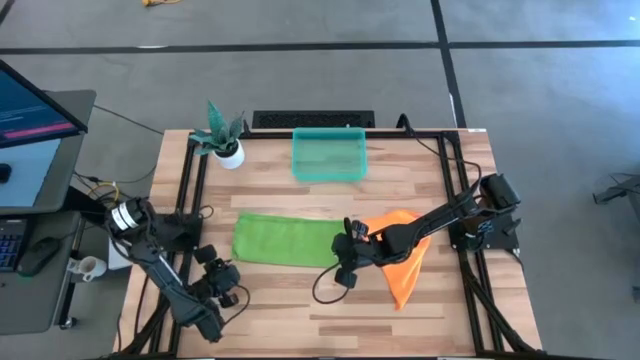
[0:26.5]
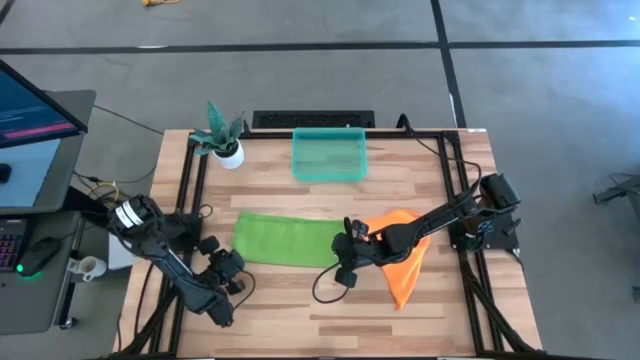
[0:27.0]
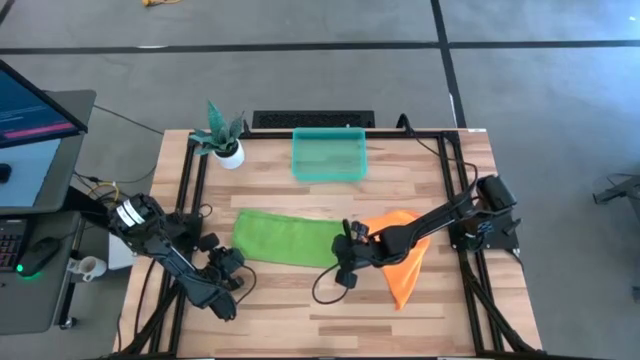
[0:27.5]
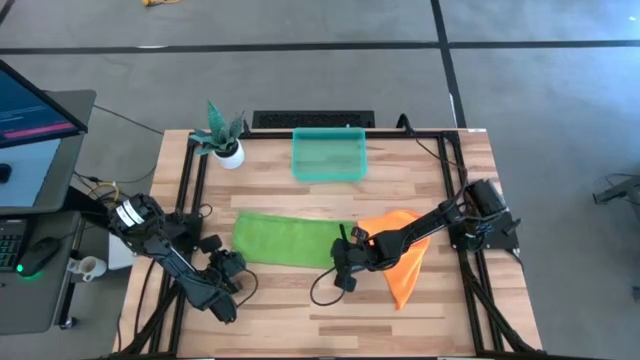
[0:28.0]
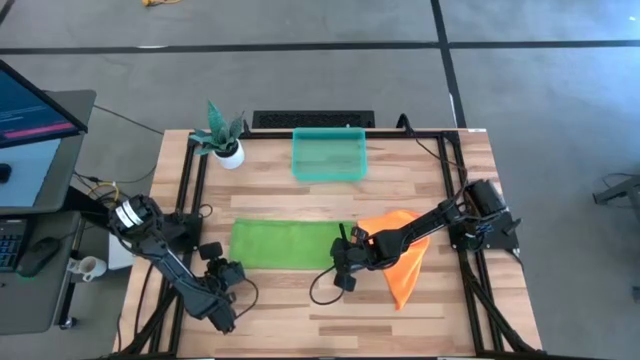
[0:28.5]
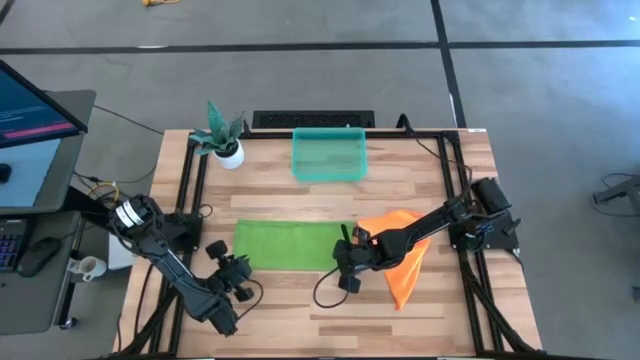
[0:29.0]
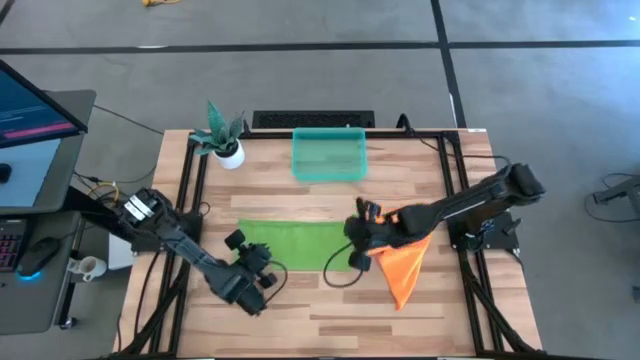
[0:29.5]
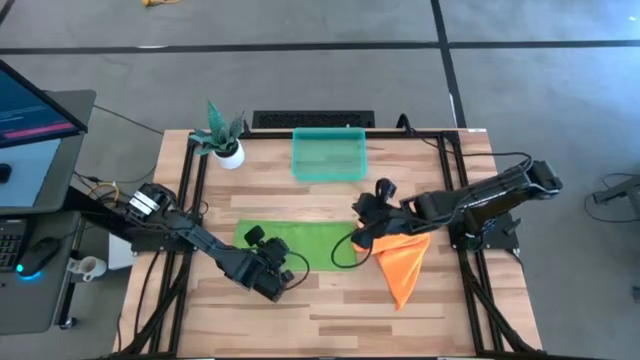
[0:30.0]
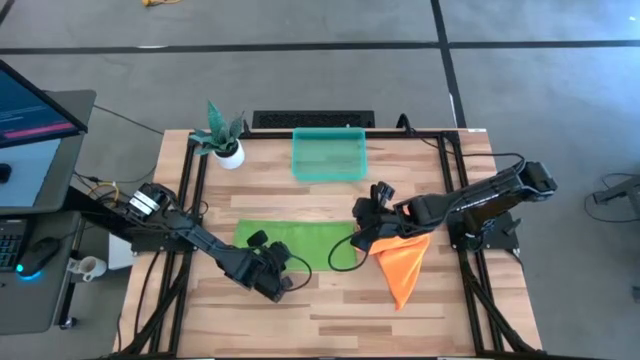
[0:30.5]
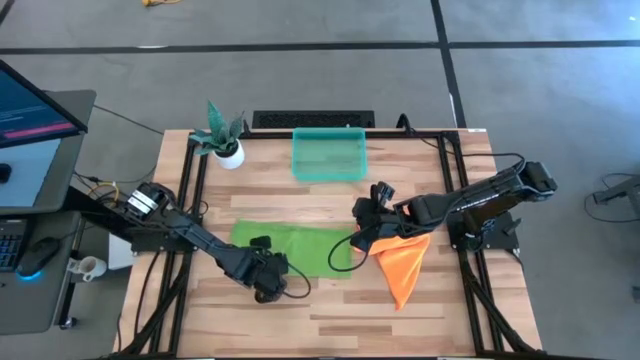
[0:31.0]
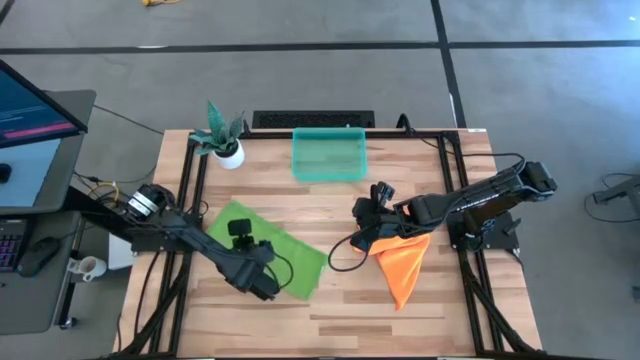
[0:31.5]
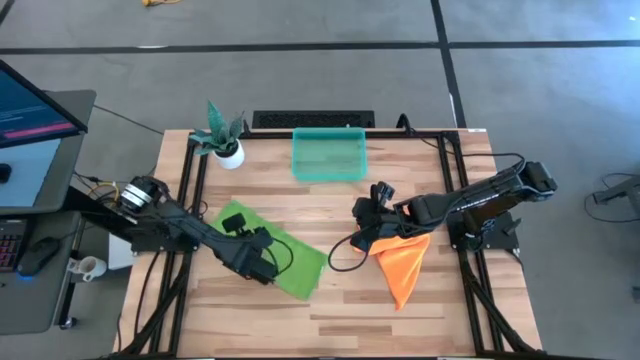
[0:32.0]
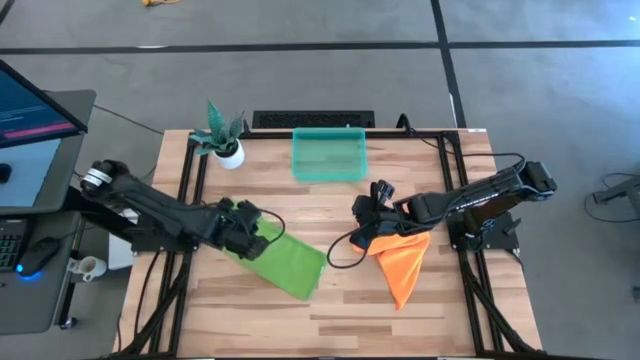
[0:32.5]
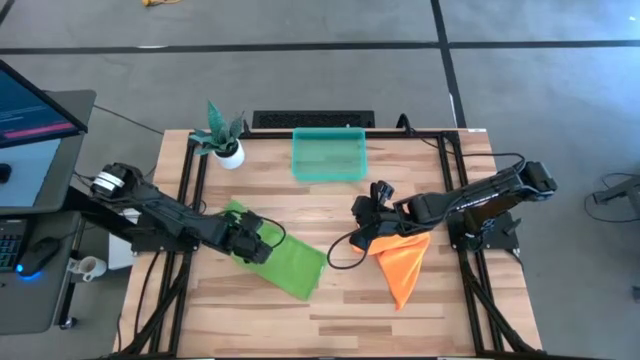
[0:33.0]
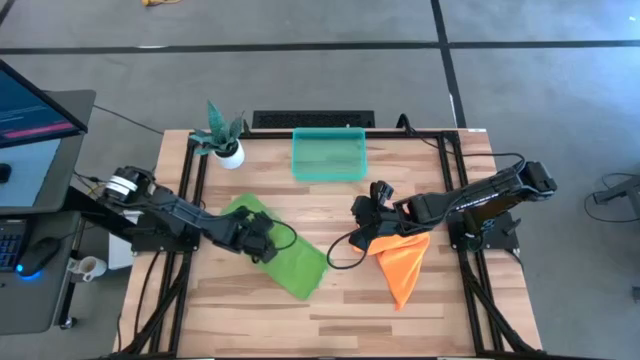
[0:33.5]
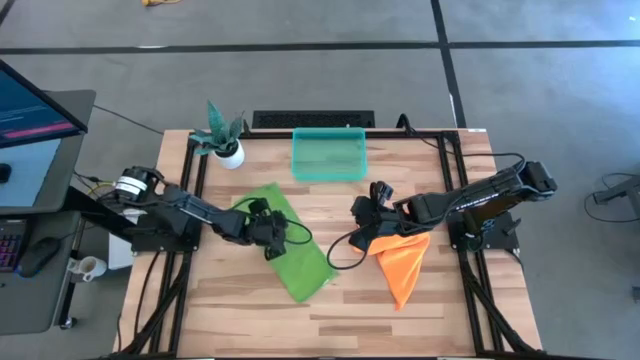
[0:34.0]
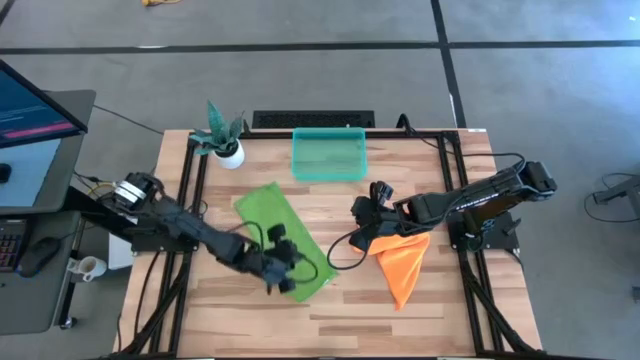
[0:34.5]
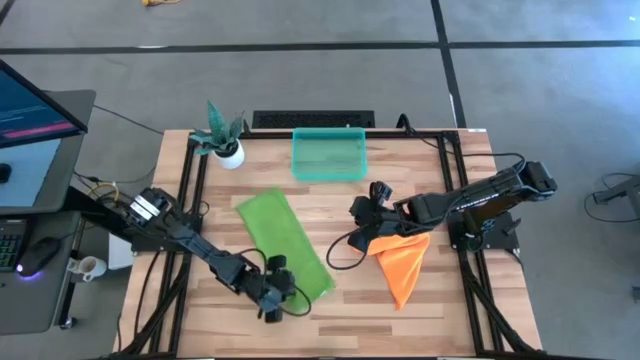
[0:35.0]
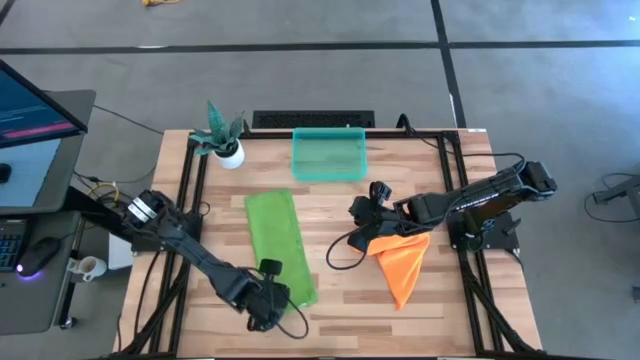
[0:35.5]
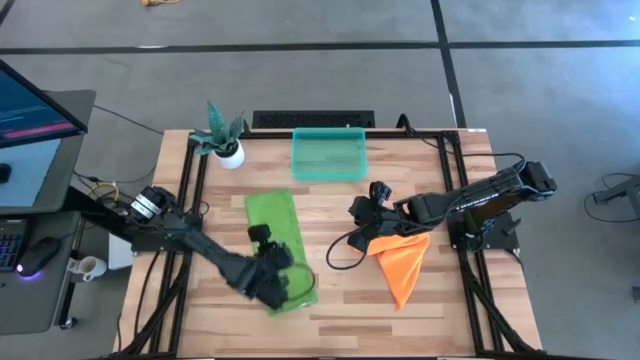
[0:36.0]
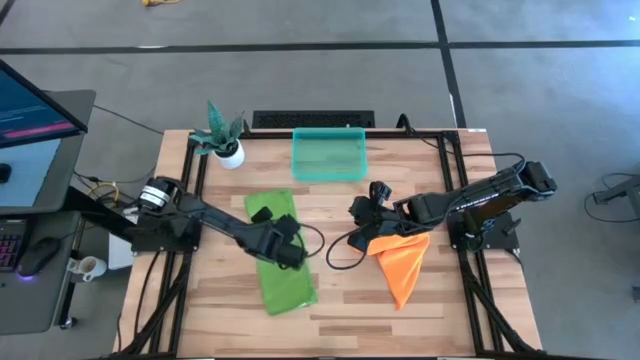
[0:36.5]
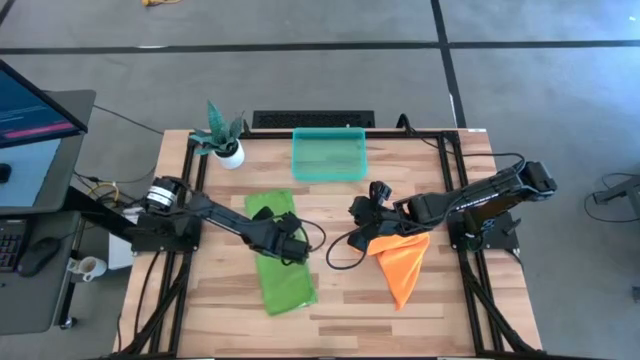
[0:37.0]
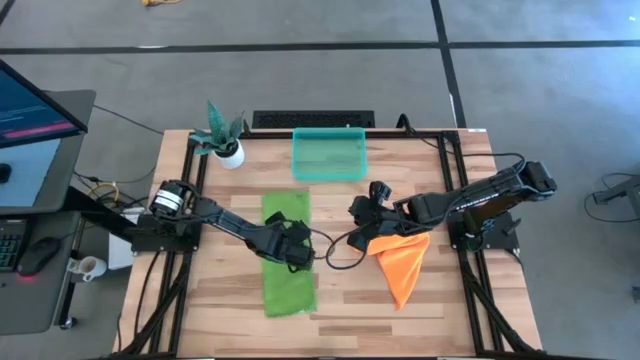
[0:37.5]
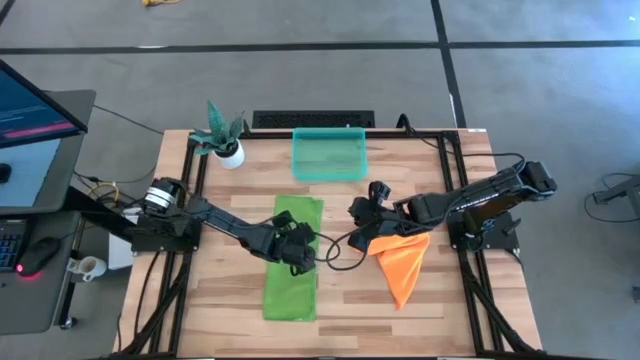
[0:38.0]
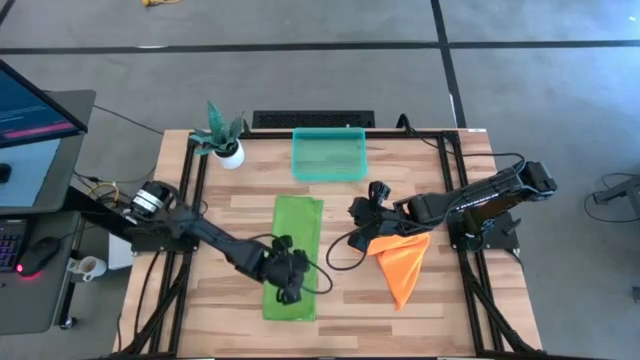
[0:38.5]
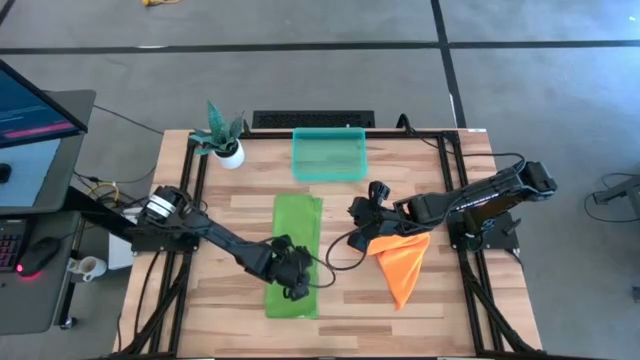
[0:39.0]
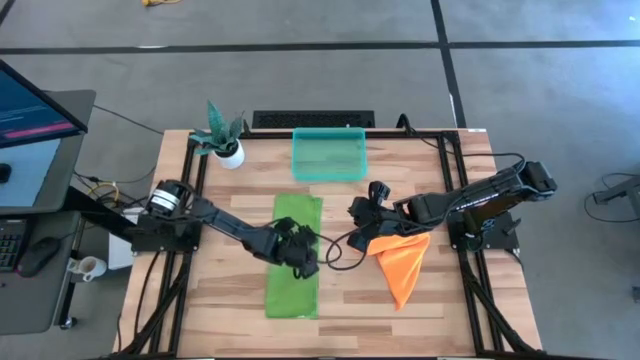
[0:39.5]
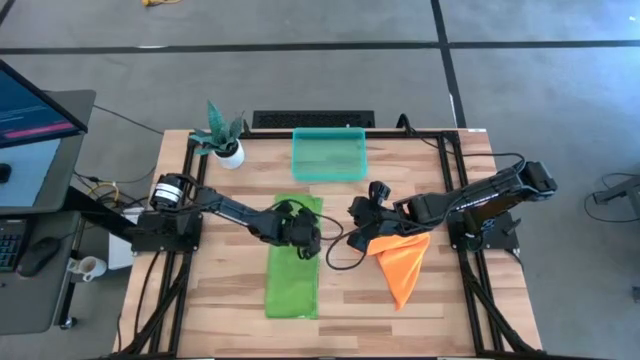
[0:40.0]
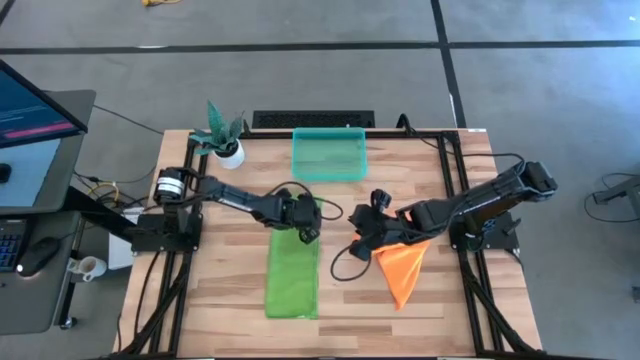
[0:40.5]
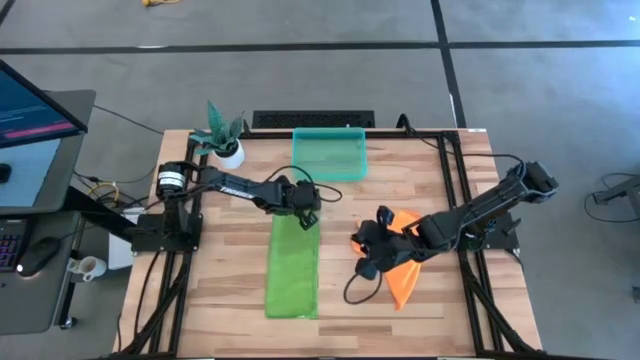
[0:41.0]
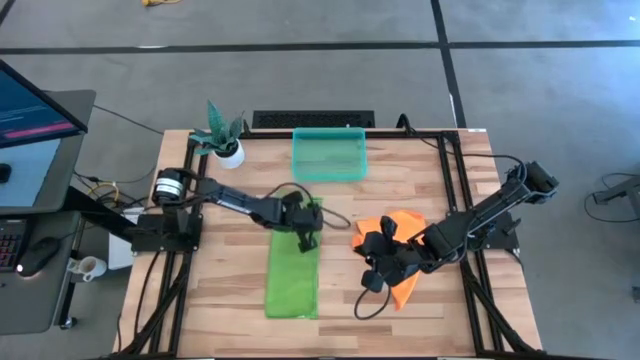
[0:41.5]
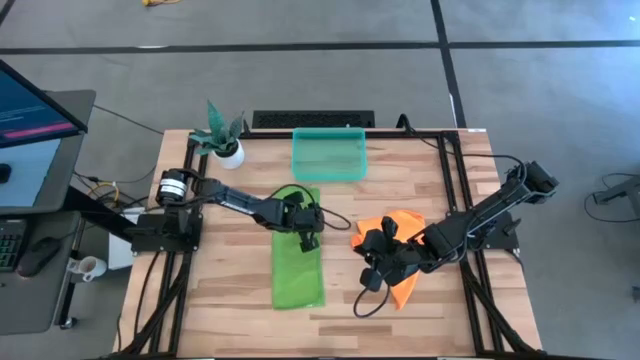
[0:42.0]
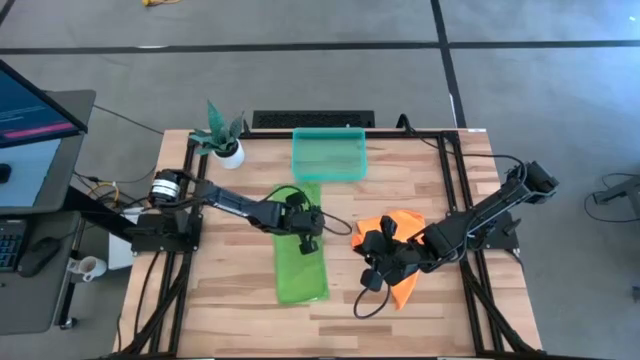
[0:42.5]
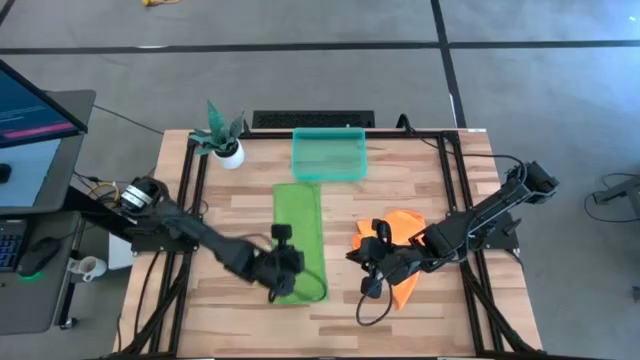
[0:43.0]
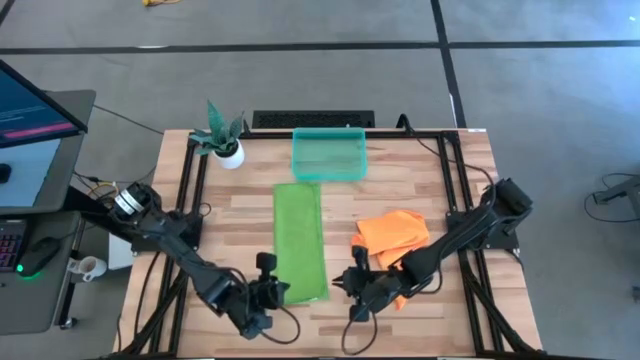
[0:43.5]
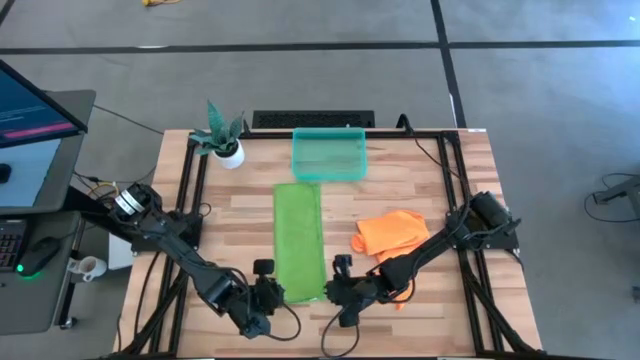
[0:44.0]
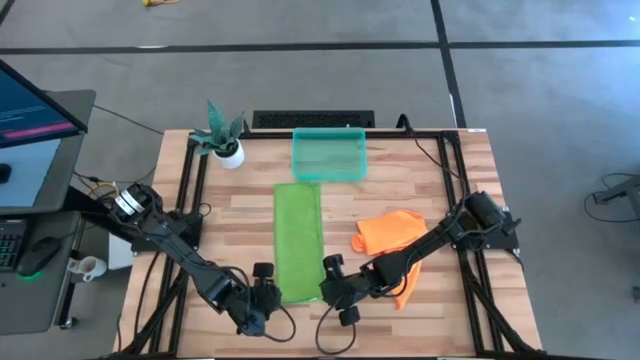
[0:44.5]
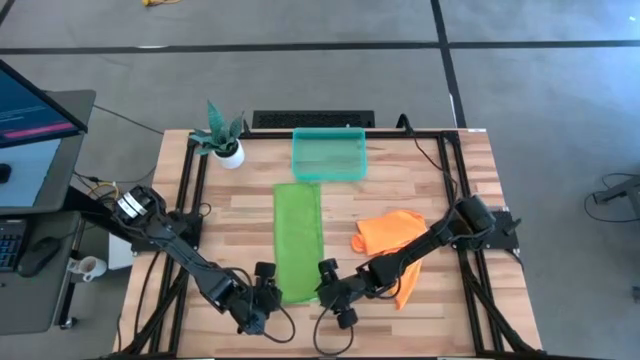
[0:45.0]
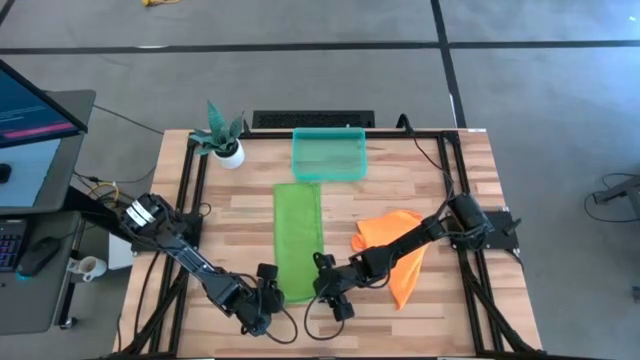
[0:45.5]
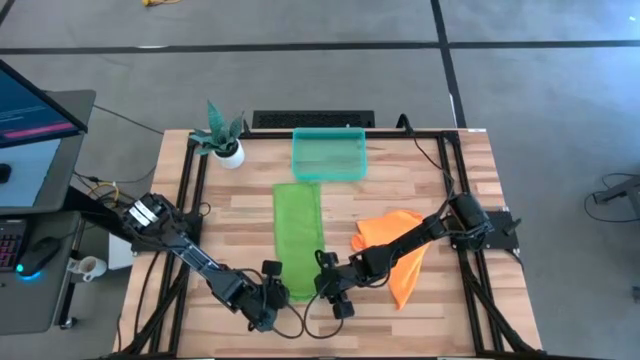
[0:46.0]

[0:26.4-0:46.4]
Task: Roll towel into tight, uniform cylinder
Roll the green microfiber towel

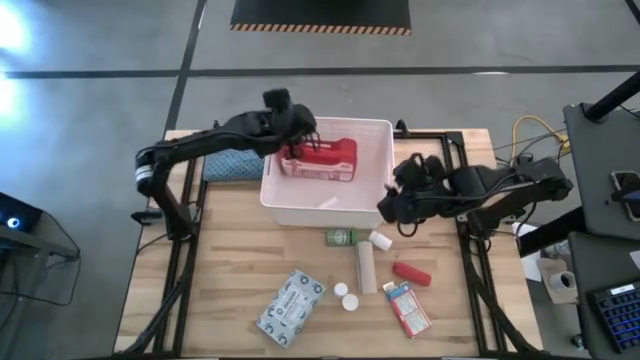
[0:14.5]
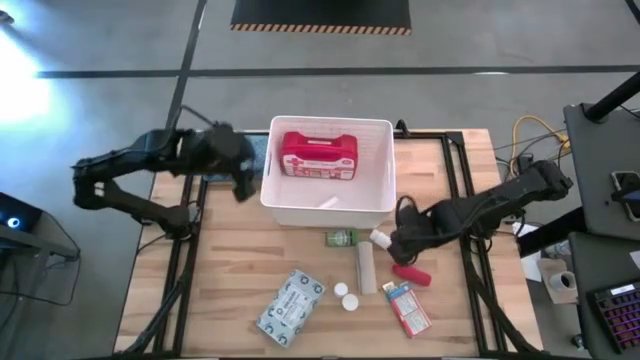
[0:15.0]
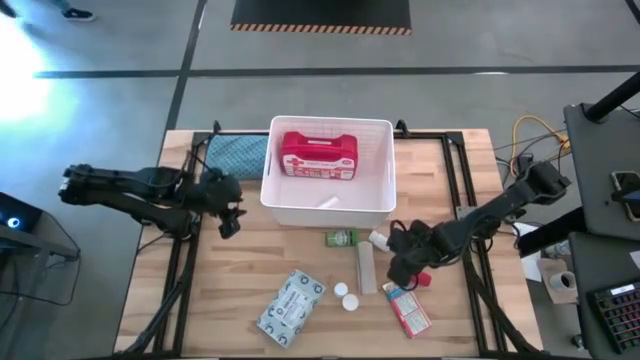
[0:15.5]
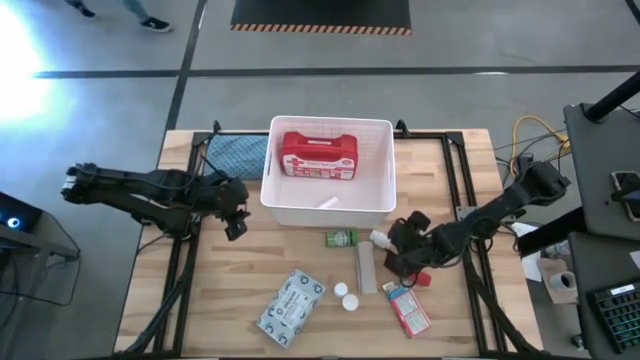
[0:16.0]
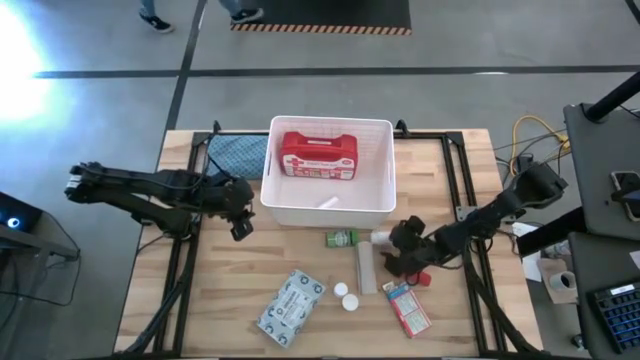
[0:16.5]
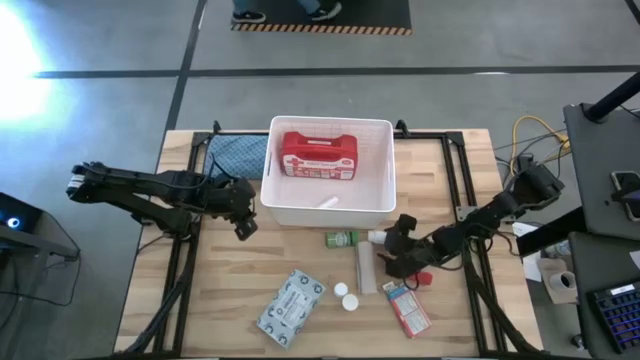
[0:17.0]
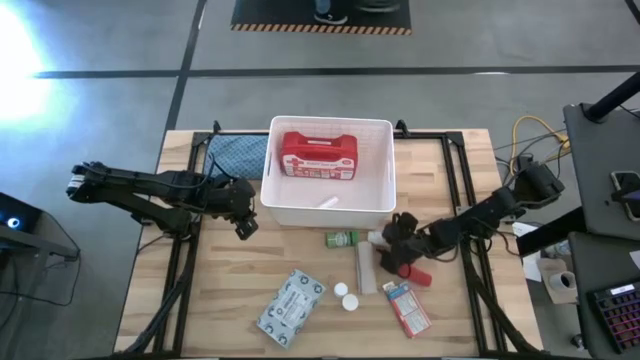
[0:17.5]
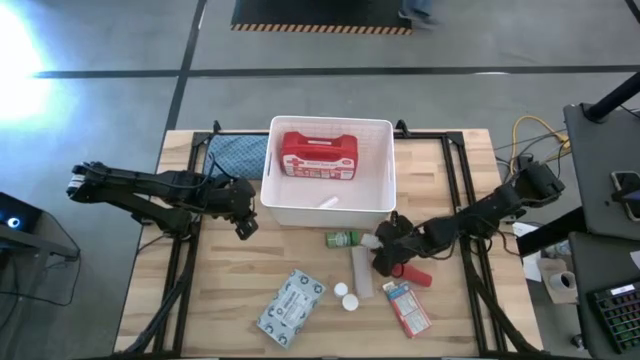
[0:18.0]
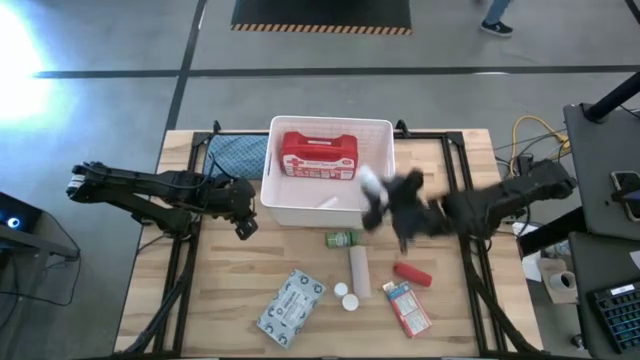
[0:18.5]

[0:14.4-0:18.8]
Task: Pick & place medical supplies in basket/bin
Put the top white medicine bottle into the bin
